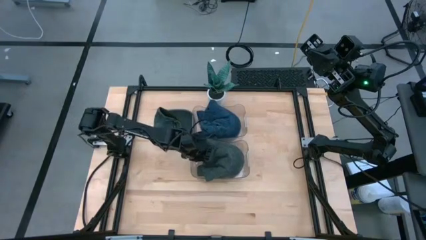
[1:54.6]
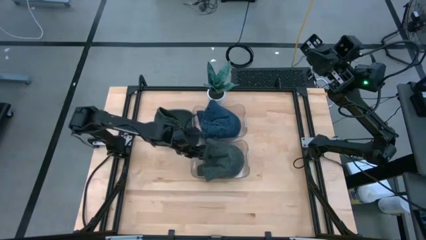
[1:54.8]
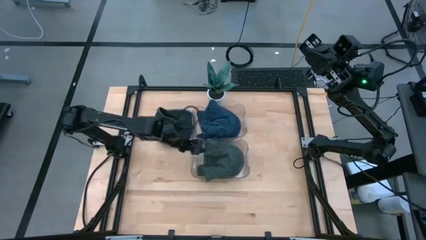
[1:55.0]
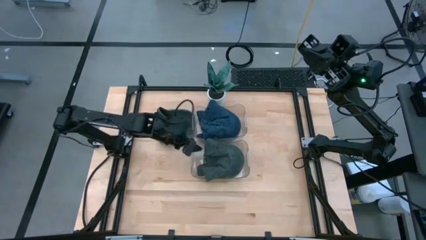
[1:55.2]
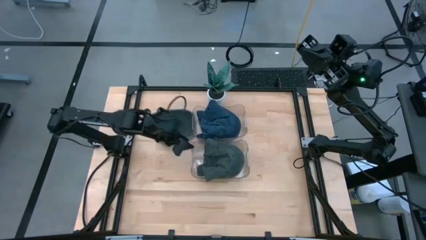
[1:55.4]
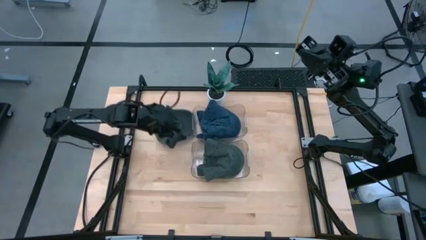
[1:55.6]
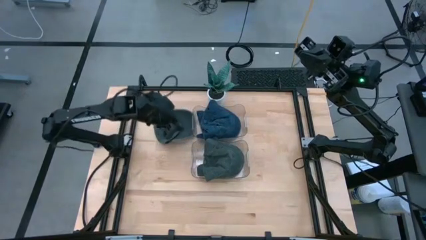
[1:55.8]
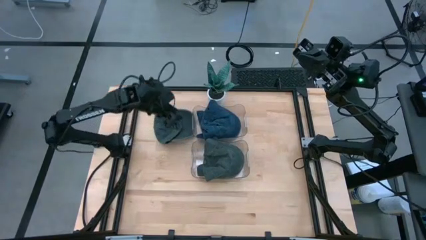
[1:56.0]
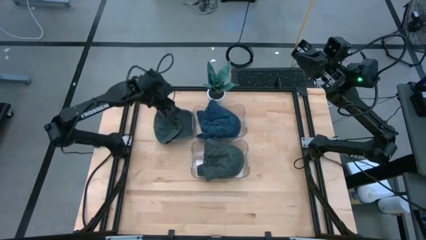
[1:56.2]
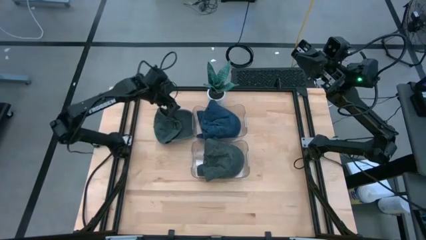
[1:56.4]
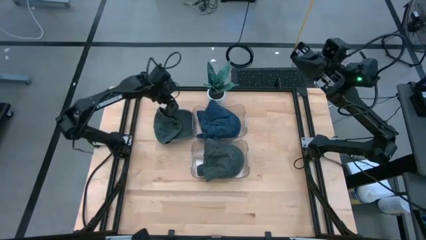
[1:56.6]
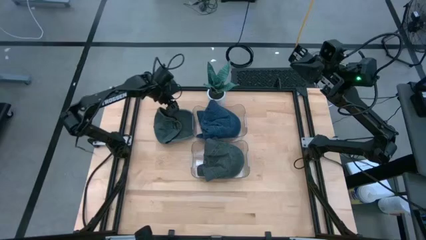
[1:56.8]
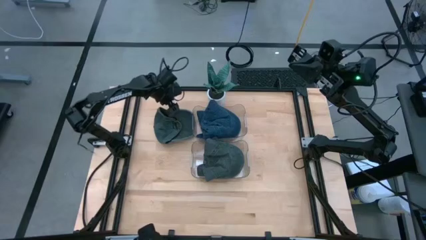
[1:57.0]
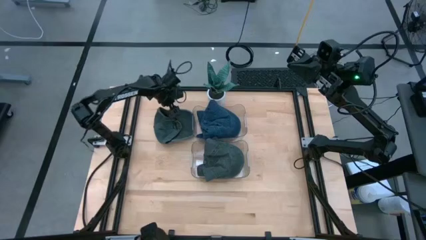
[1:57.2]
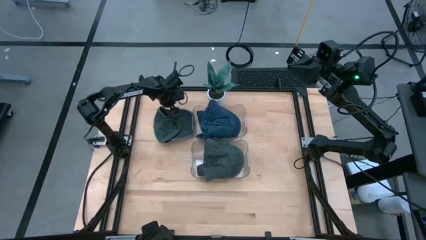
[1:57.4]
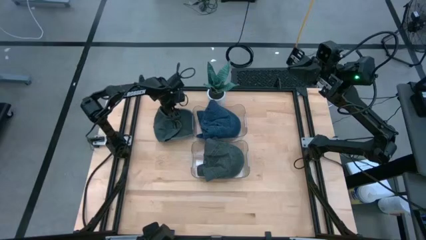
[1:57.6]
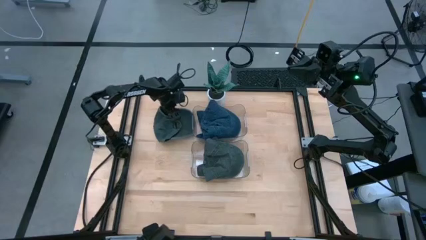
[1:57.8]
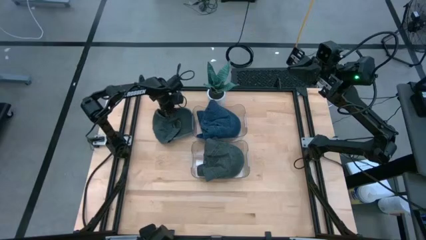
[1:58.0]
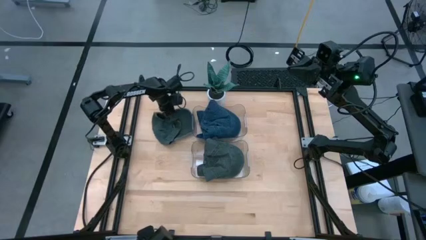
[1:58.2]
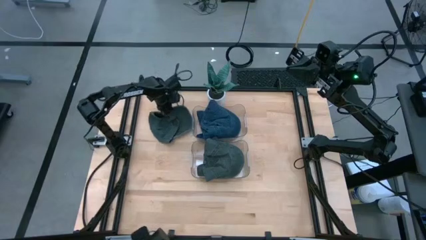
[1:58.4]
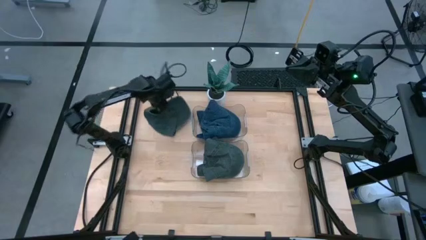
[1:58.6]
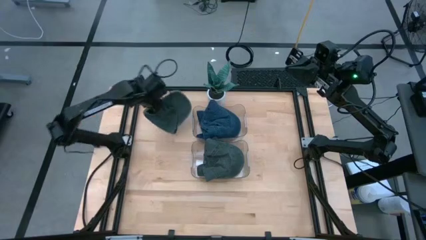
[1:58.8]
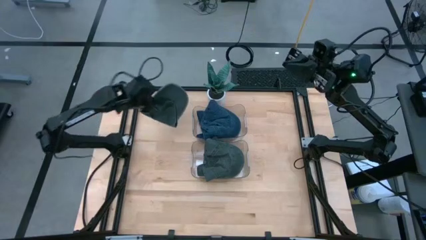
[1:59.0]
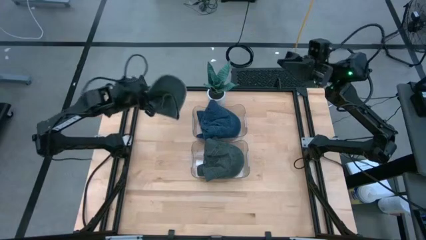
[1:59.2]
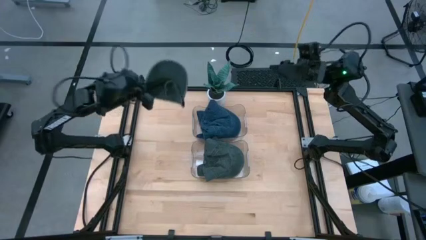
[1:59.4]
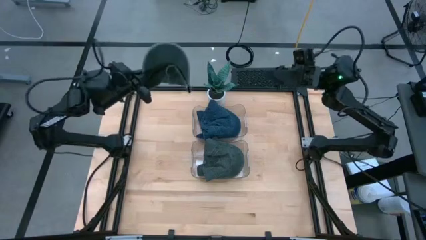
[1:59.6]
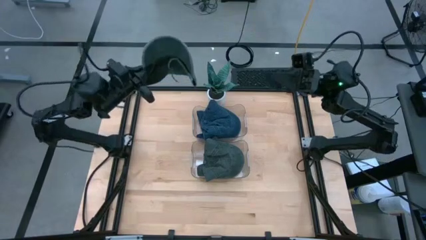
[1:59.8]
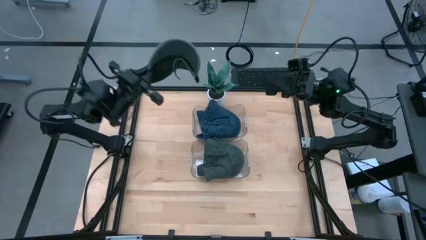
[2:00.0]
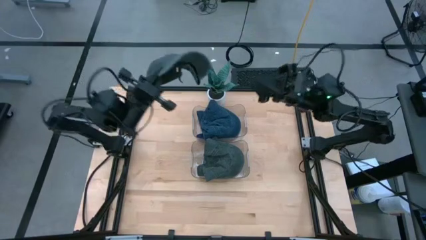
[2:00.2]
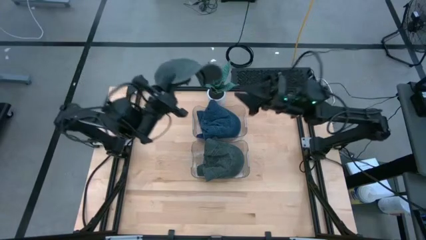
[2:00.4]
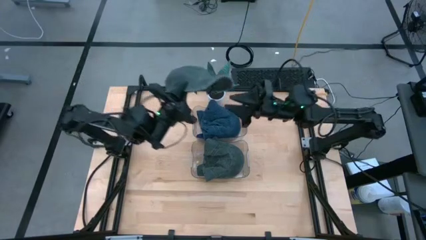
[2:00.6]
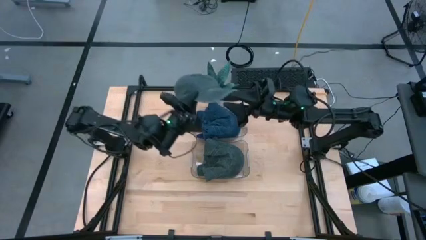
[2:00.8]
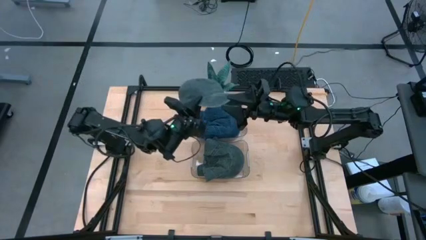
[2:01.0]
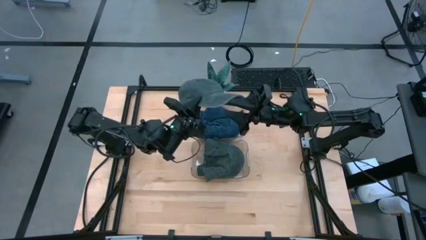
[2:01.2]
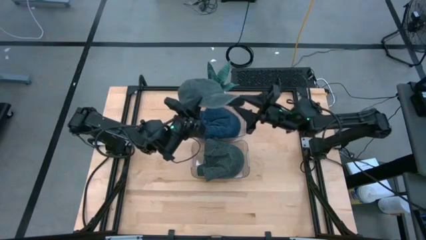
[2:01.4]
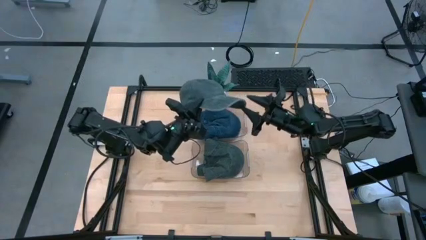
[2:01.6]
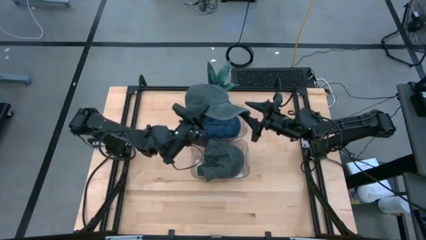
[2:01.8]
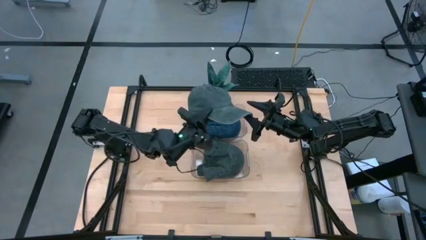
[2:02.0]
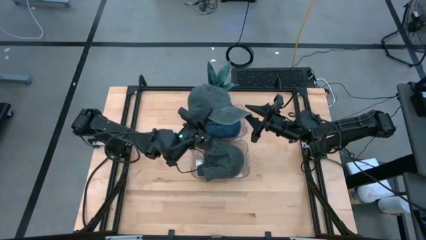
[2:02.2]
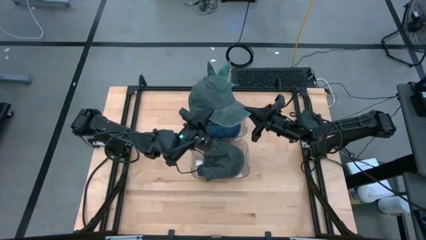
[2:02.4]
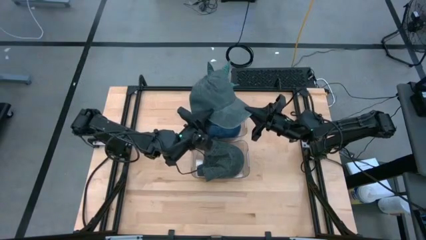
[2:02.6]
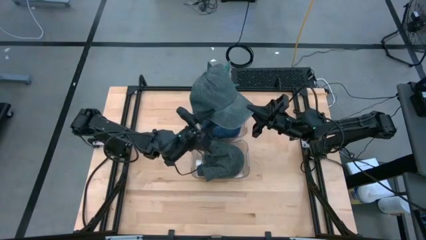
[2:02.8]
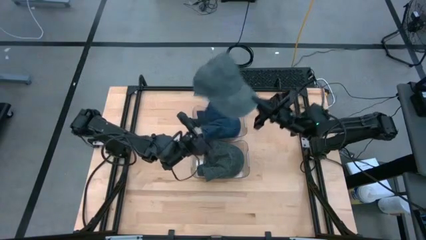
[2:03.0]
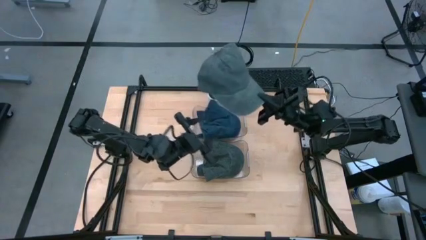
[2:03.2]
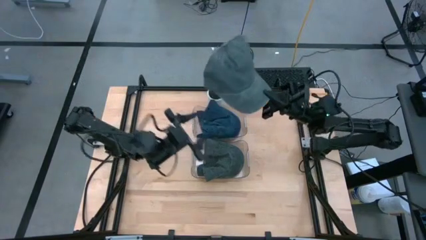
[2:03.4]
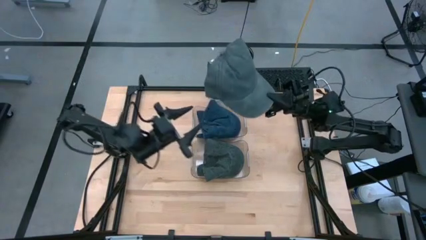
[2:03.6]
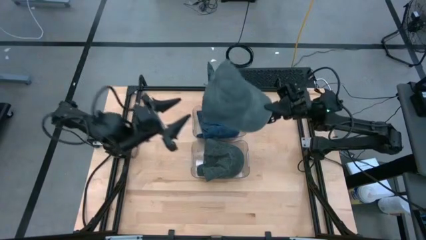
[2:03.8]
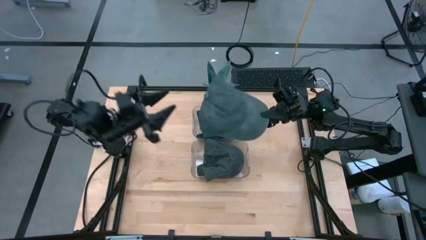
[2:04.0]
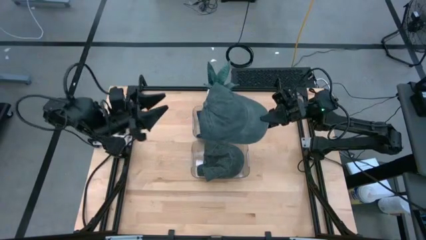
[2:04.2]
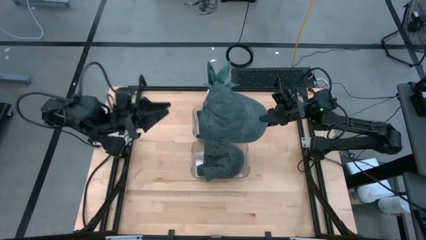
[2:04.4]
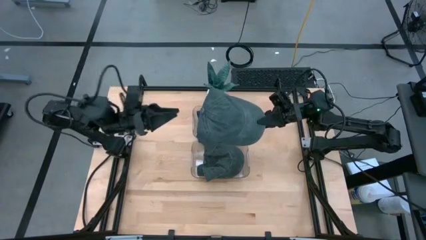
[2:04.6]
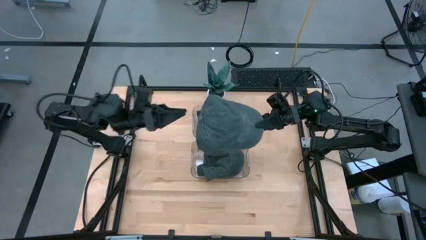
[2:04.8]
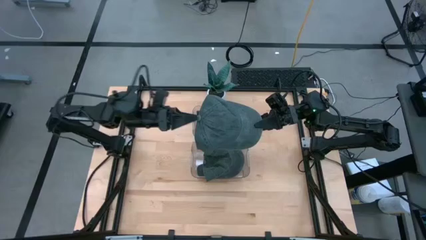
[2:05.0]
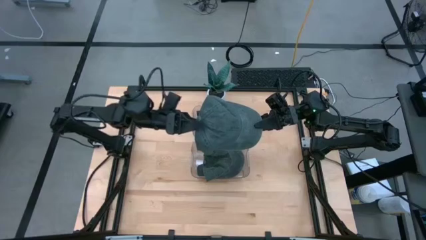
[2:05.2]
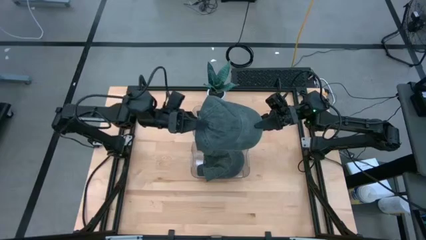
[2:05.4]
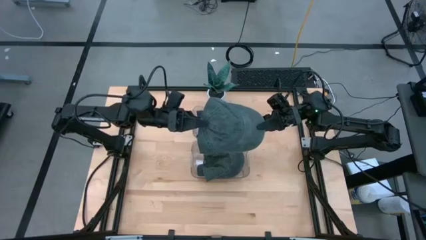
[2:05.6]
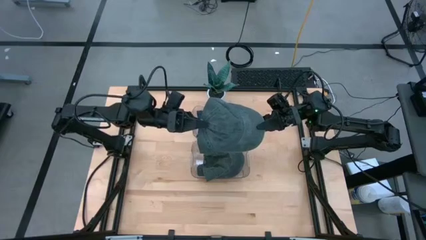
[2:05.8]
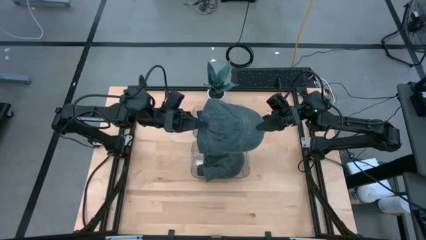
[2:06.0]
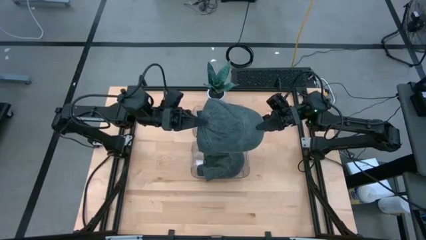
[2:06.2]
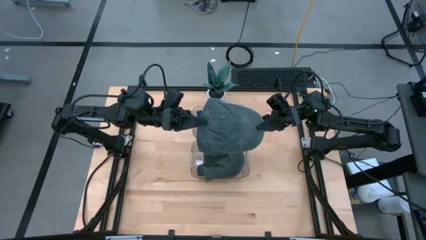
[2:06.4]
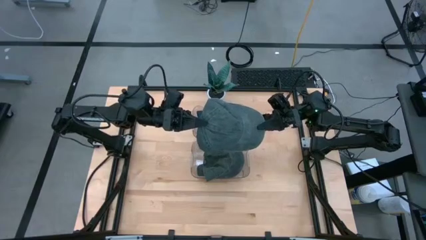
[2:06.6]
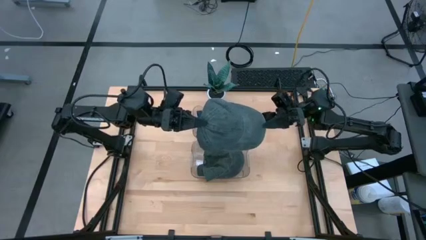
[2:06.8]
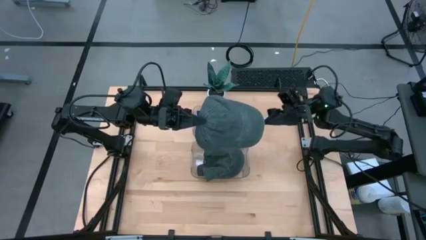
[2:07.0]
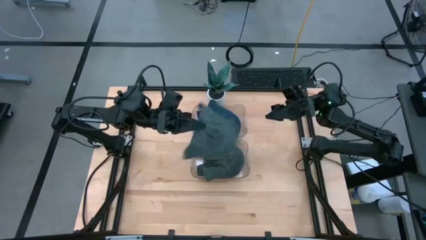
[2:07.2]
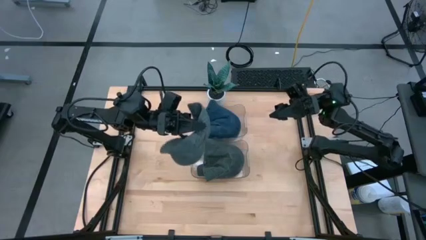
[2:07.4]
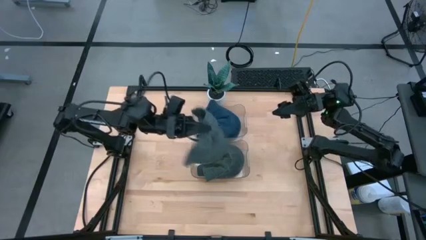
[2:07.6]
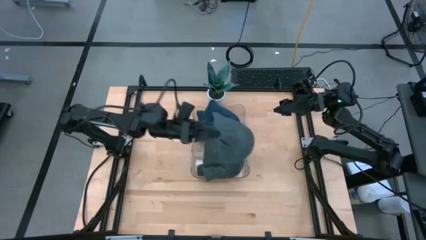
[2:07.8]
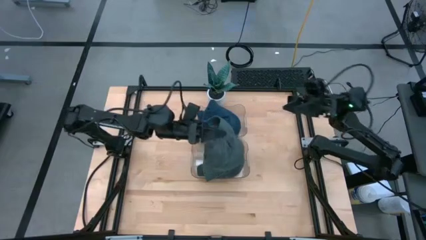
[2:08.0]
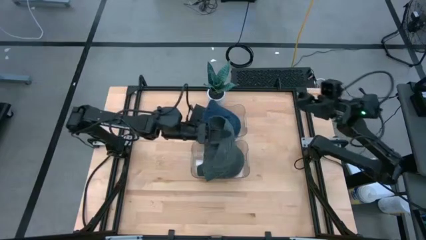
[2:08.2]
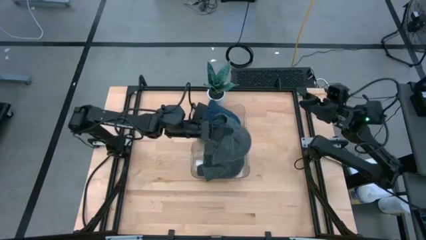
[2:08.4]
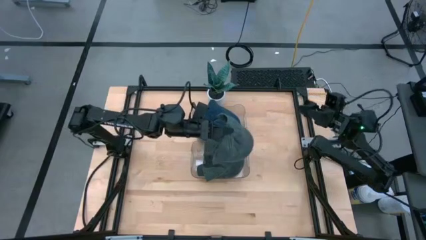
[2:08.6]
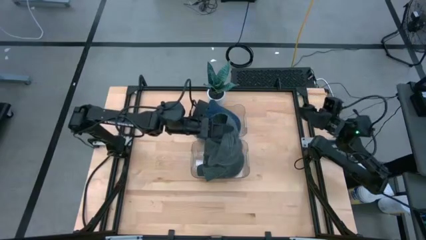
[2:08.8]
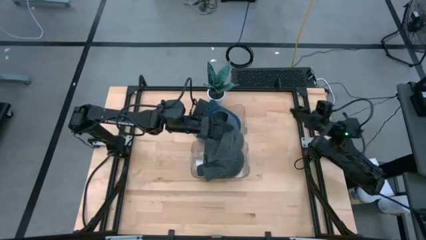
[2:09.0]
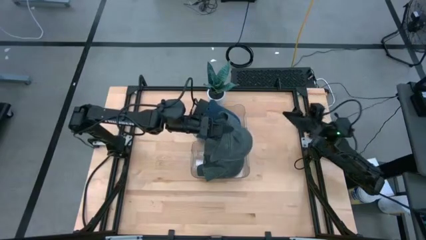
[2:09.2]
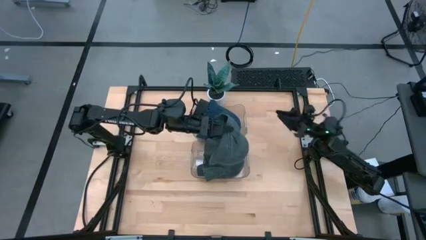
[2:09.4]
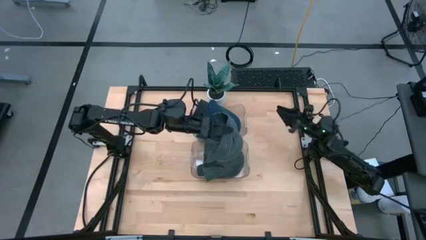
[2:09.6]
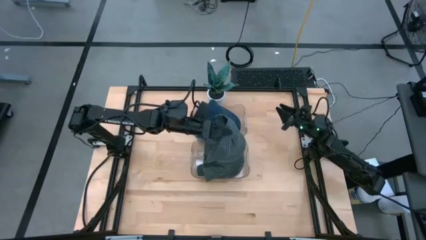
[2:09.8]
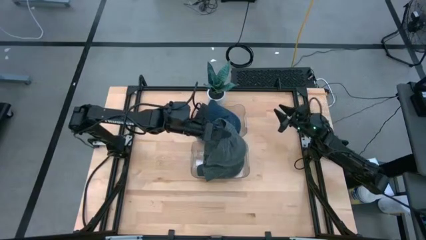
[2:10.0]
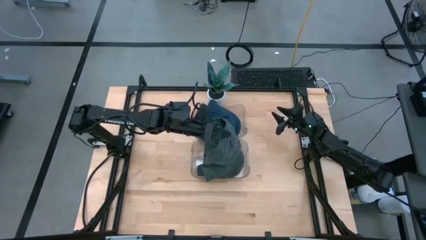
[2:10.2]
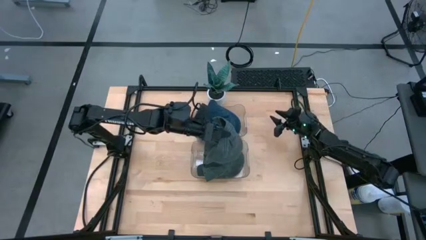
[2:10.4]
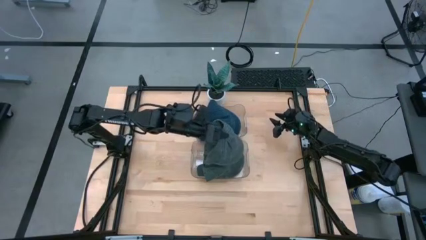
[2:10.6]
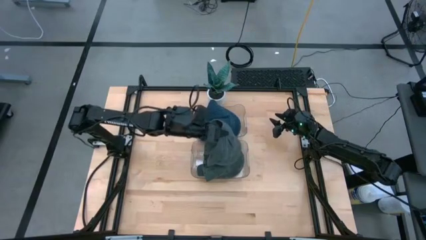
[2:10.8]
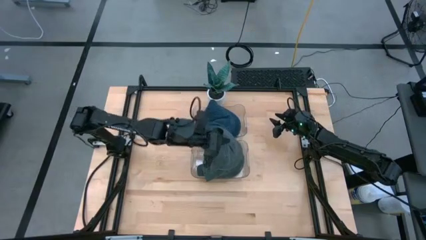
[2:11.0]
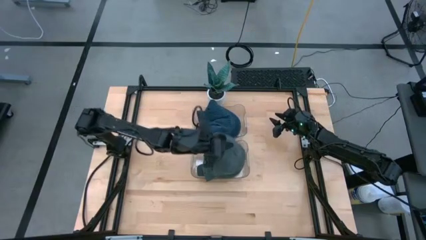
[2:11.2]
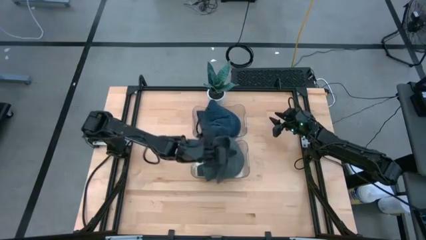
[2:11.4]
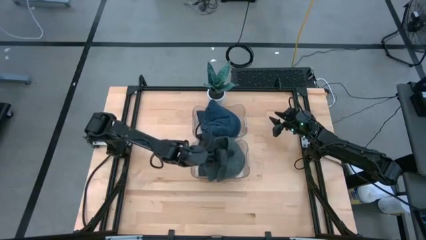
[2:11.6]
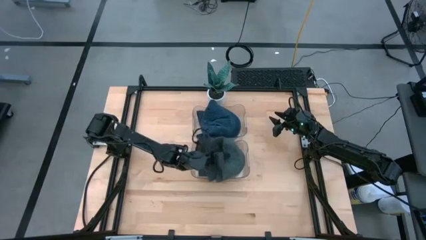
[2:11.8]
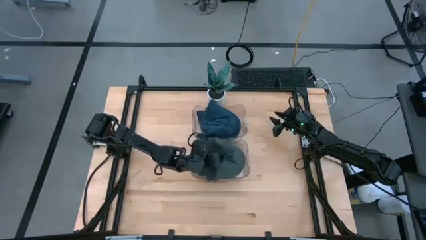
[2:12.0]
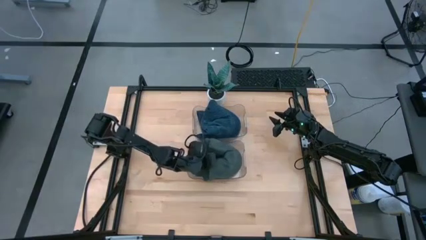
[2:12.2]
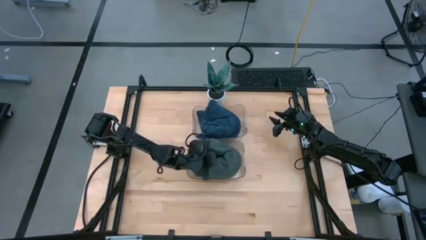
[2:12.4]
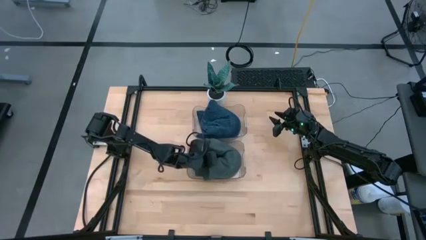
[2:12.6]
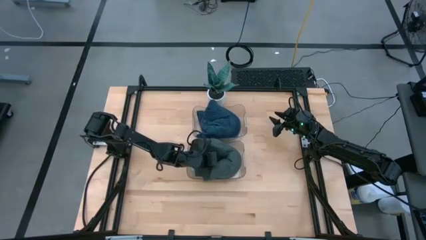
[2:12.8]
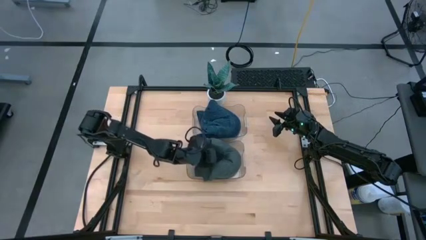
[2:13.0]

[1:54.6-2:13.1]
Task: Pick & Place hat
Put the black cap into the bottom transparent bin
